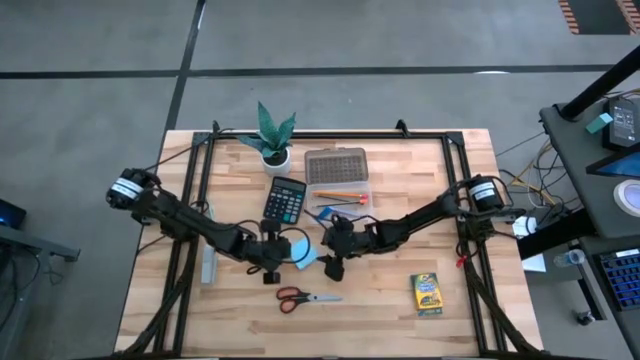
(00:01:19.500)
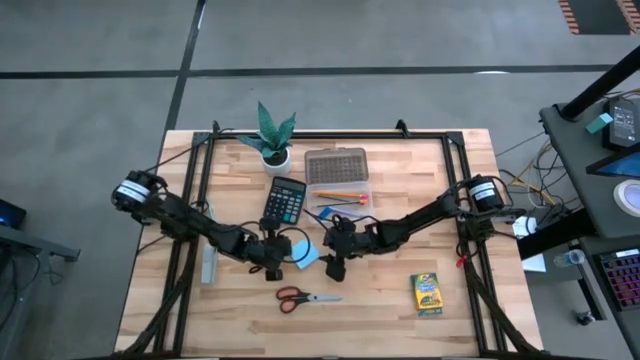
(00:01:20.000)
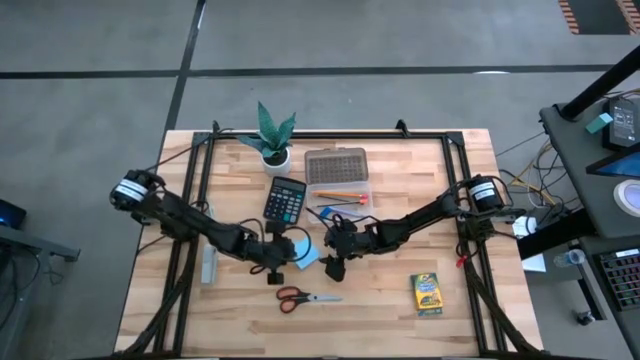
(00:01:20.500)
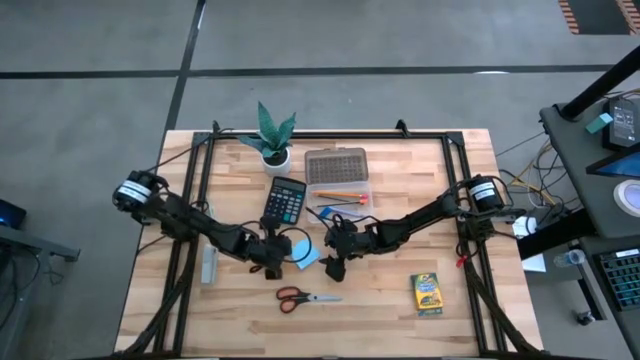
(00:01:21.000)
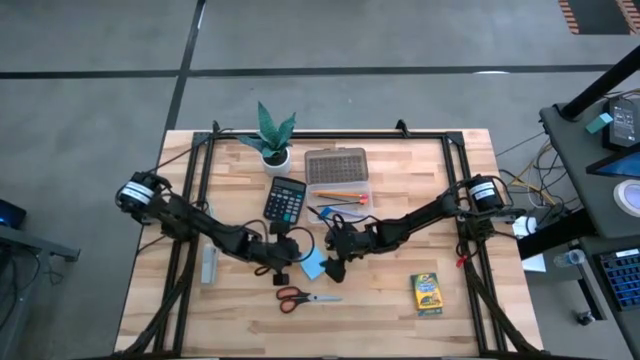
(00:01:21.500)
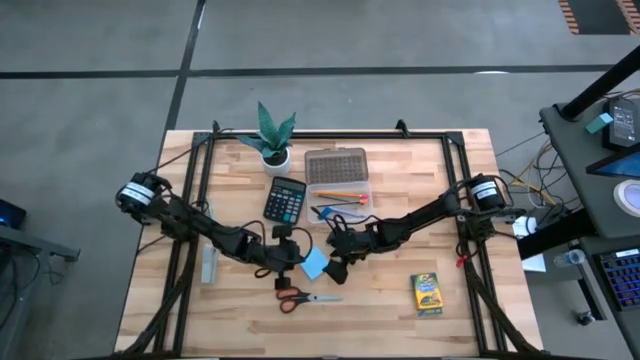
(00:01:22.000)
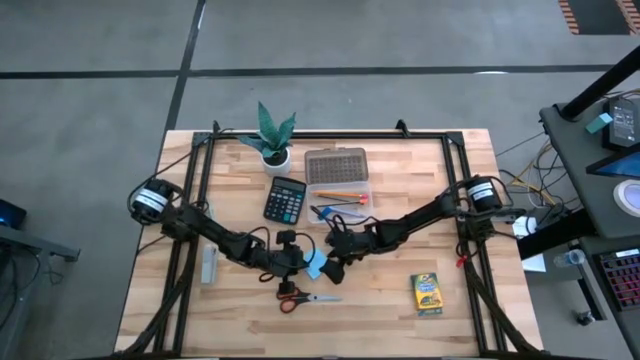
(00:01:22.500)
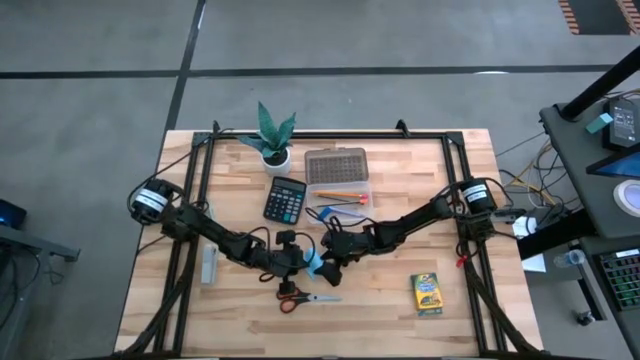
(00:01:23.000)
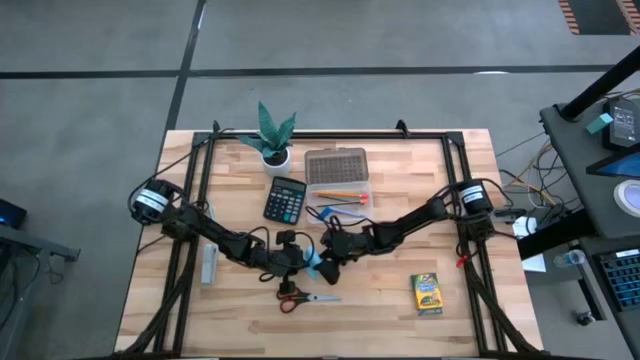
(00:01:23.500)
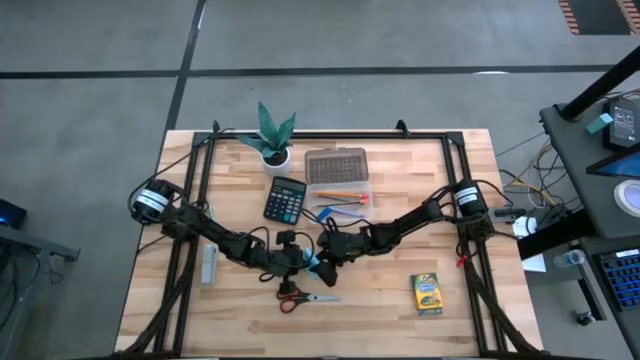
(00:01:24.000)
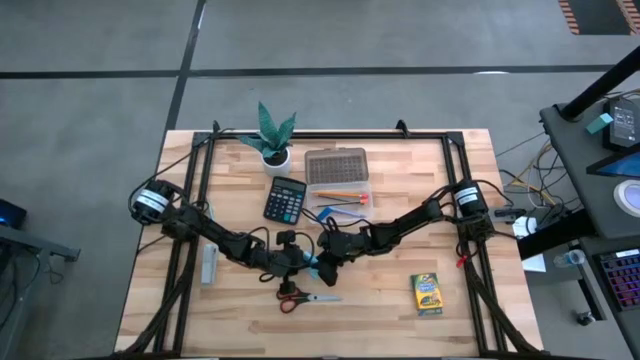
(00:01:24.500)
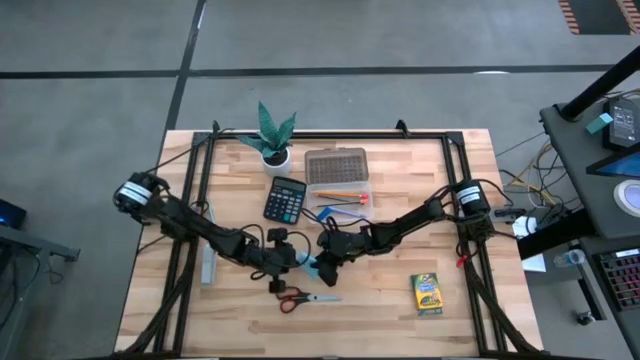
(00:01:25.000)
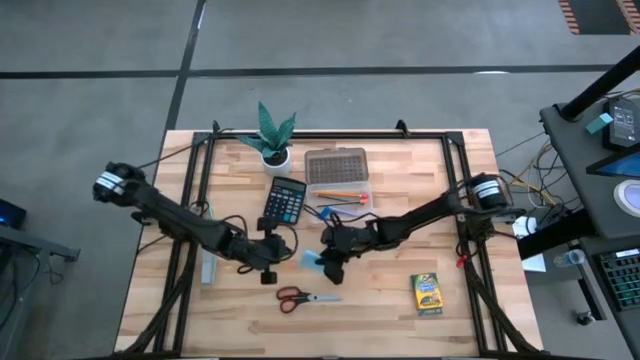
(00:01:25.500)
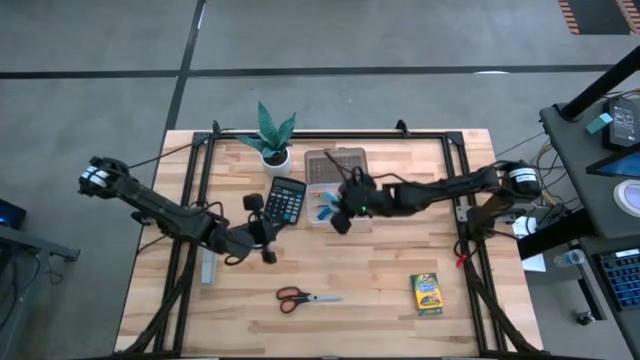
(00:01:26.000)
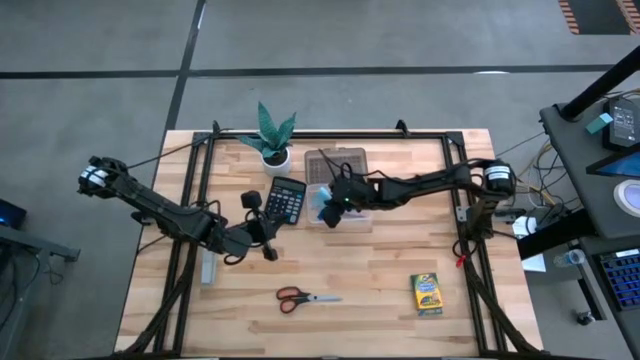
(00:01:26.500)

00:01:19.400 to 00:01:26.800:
Task: Pack school essentials
Put the blue sticky note into the supplies box

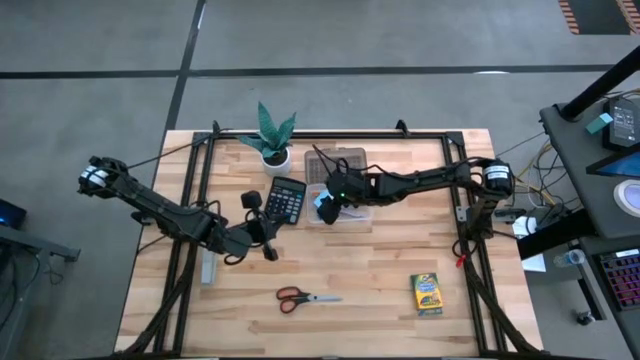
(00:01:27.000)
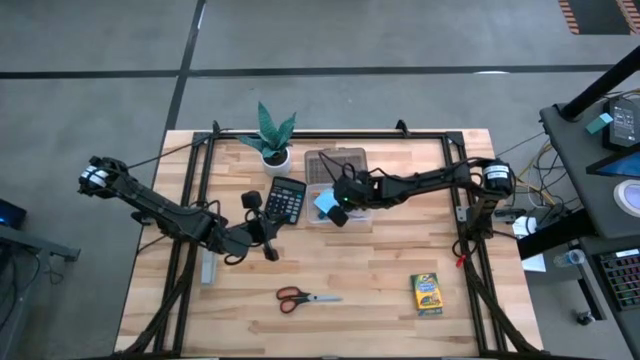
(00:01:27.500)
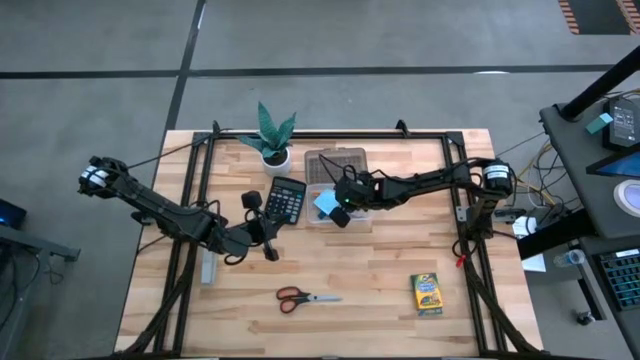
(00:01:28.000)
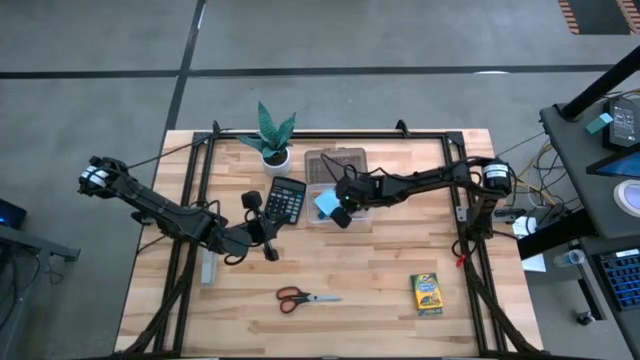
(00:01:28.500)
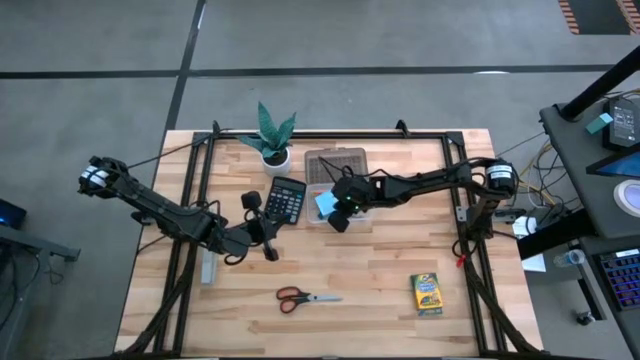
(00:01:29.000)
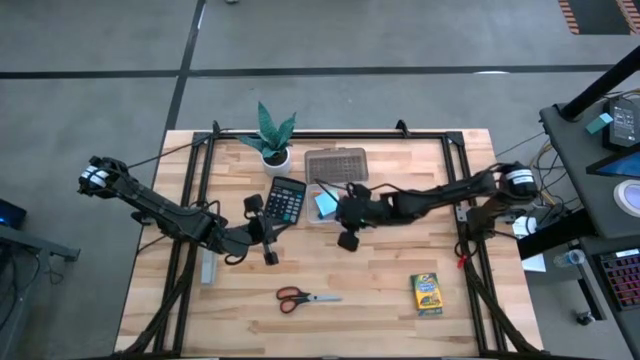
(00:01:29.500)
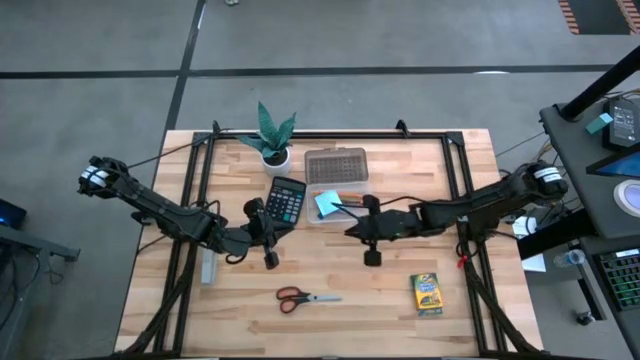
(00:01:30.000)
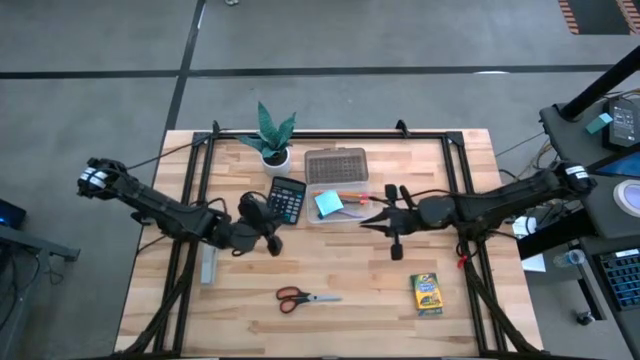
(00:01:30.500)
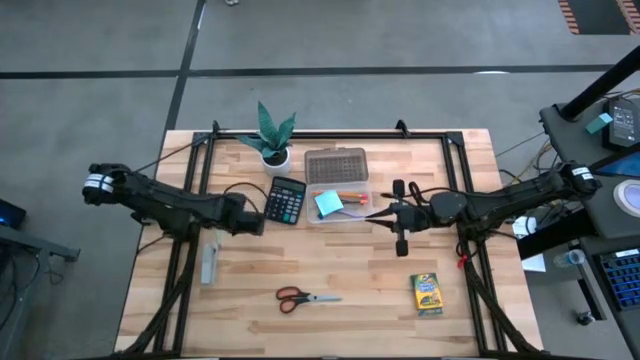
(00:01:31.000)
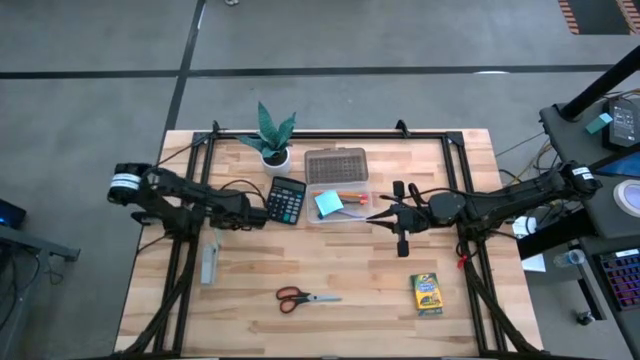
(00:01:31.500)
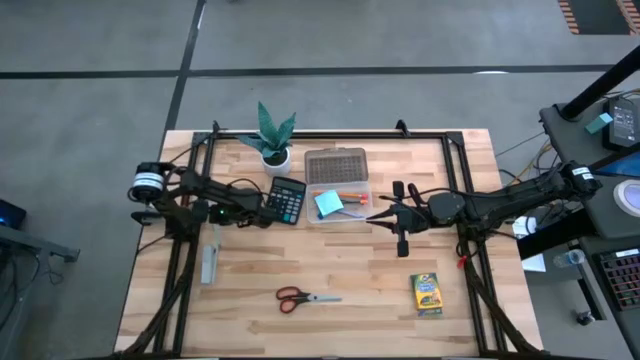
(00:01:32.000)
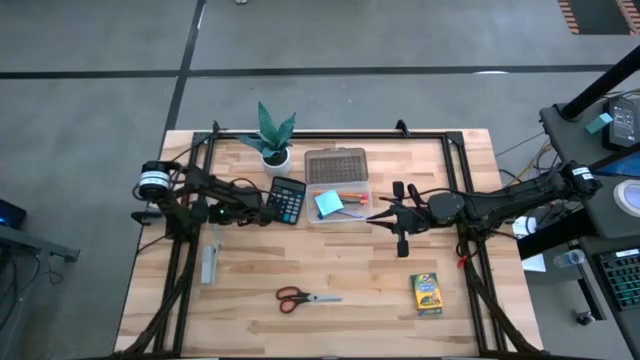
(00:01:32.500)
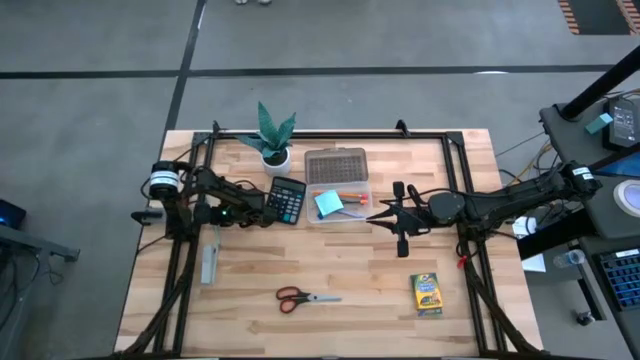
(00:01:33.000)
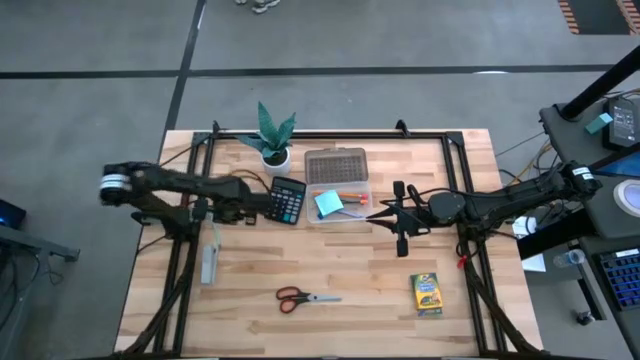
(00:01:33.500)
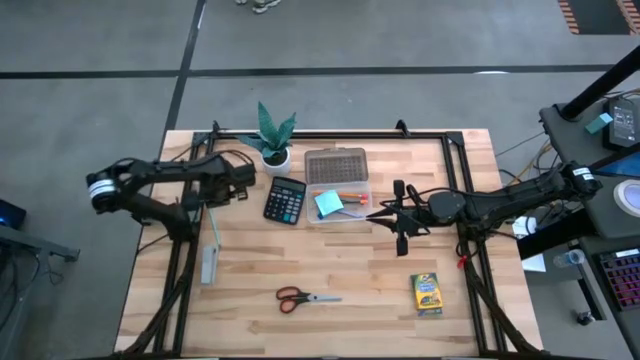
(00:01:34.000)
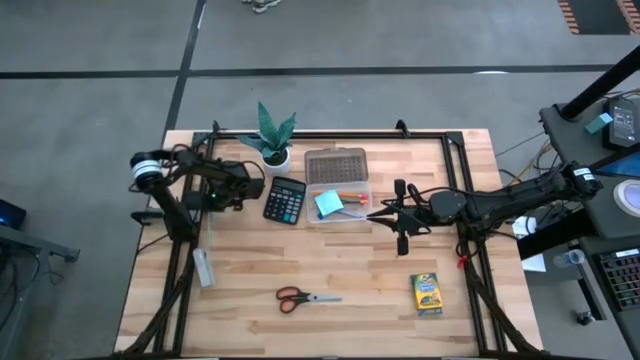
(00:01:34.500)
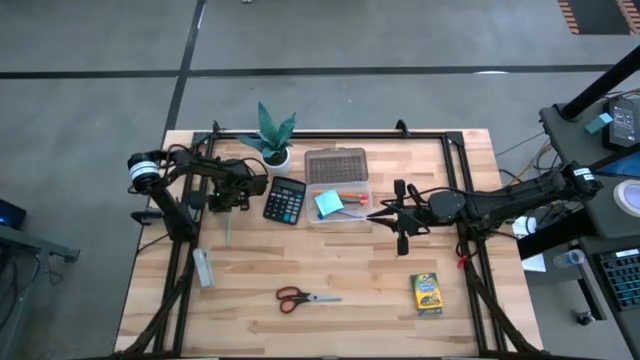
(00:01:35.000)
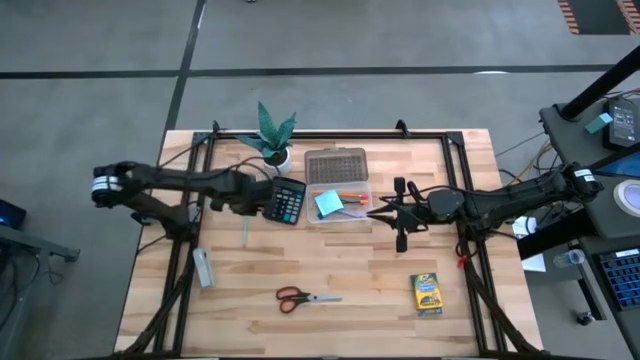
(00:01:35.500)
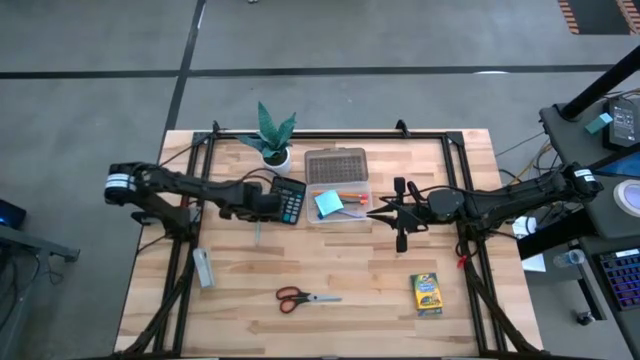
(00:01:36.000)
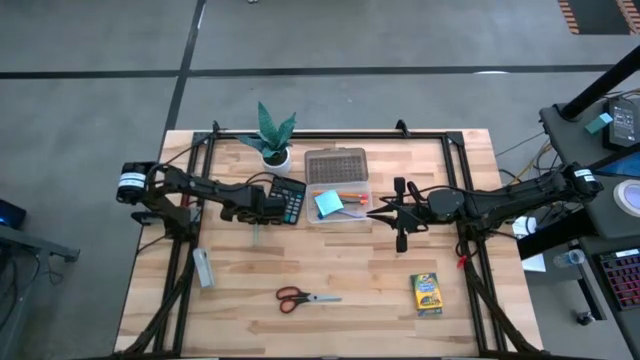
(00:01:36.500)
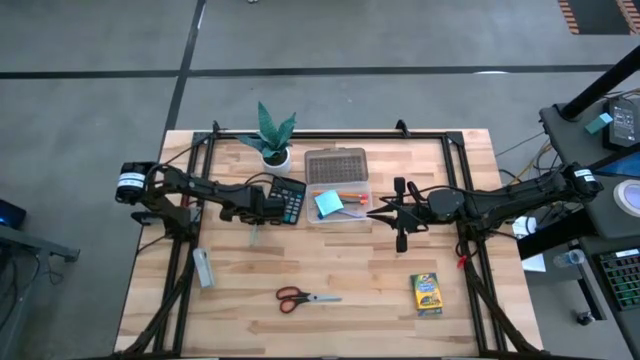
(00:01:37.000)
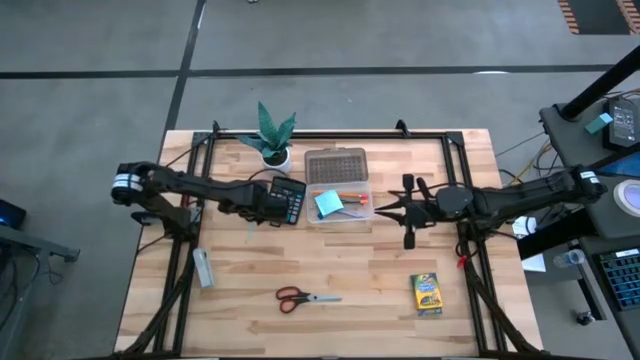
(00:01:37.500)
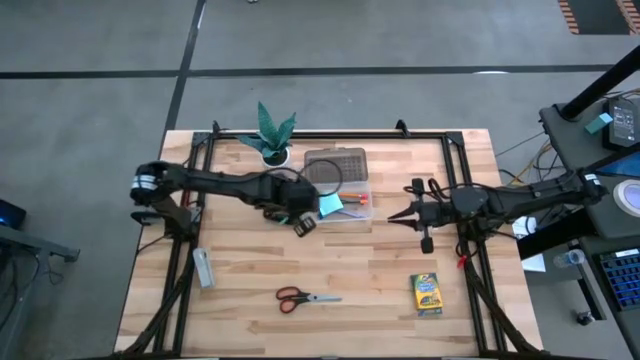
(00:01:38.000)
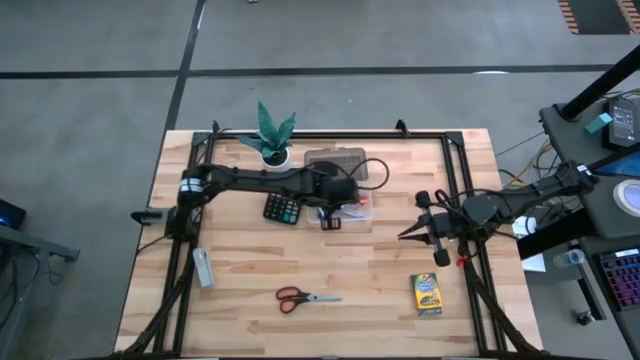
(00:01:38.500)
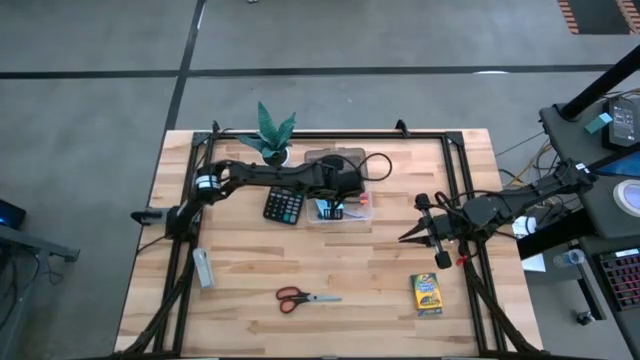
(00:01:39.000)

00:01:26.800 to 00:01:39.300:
Put the light blue pencil into the supplies box
